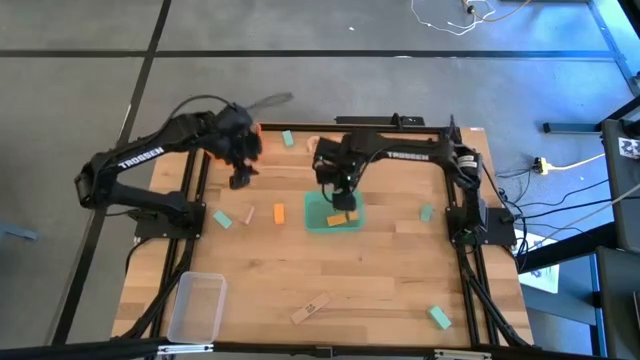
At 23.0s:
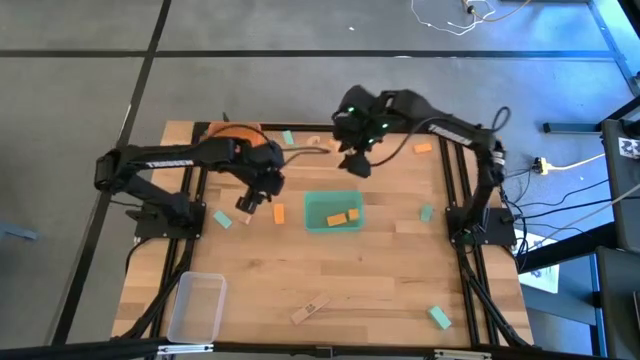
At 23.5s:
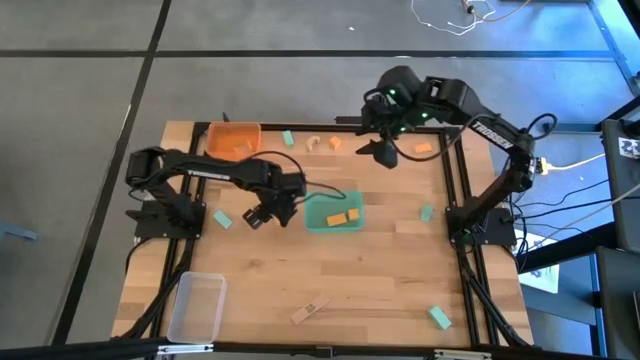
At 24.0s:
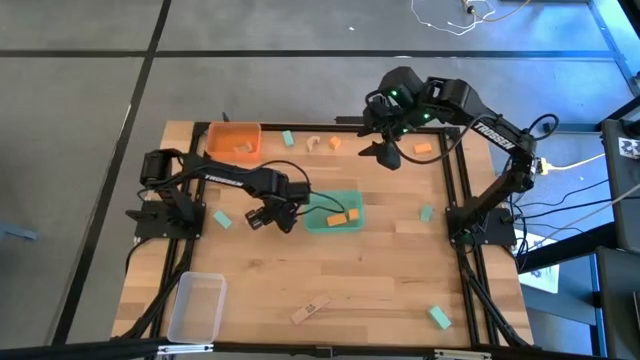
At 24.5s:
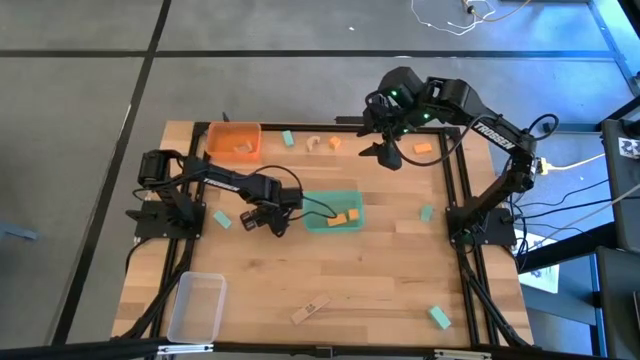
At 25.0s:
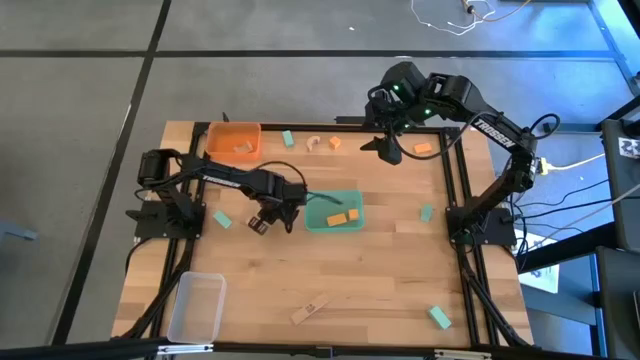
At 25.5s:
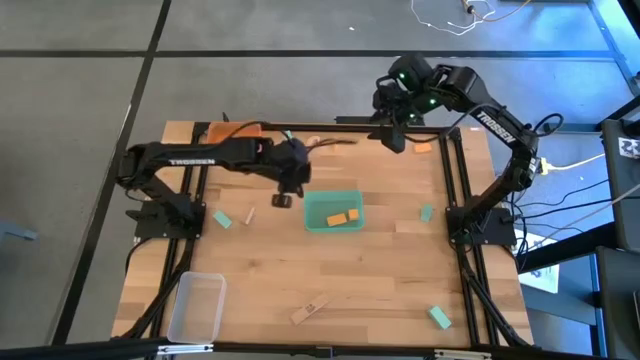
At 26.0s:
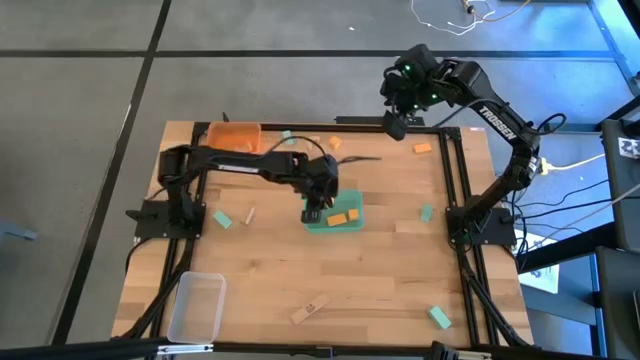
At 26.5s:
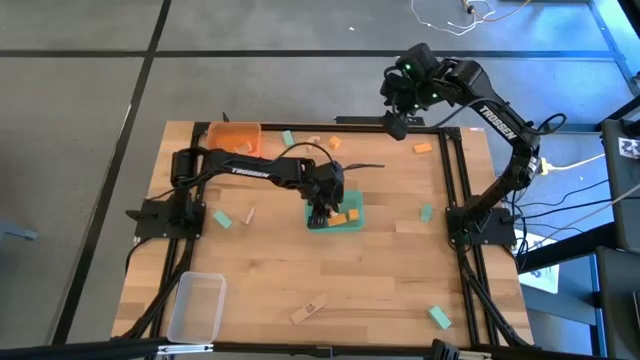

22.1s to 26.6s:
Task: Sort & place blocks by color
Put the orange block into the light blue bin

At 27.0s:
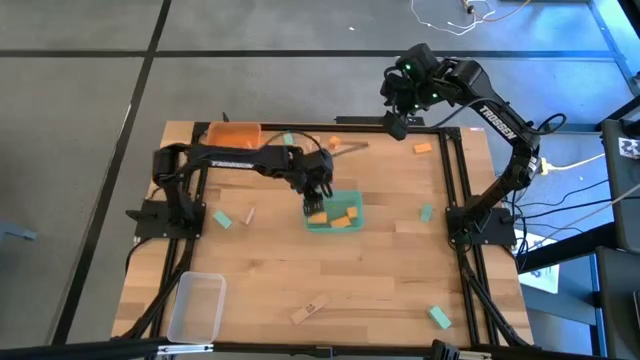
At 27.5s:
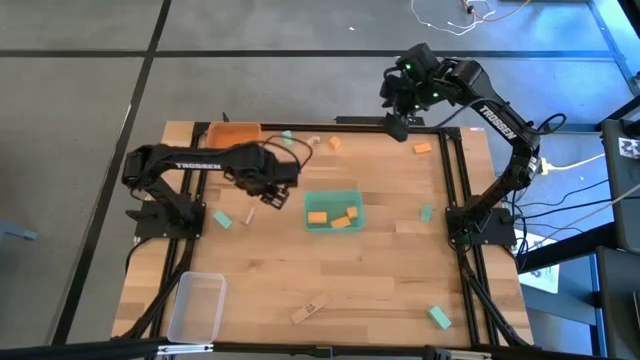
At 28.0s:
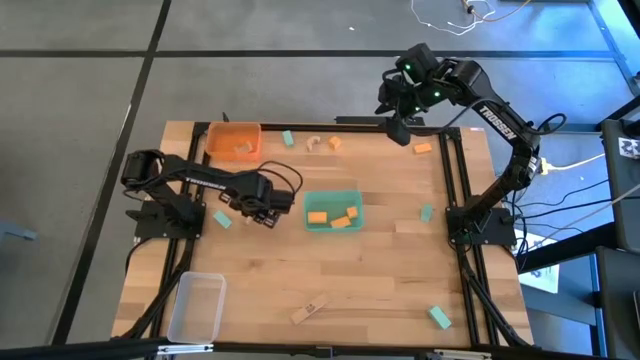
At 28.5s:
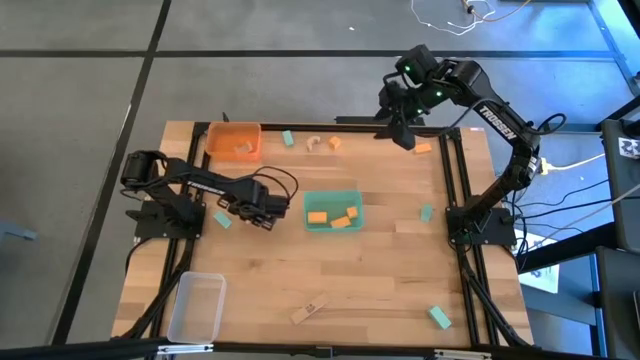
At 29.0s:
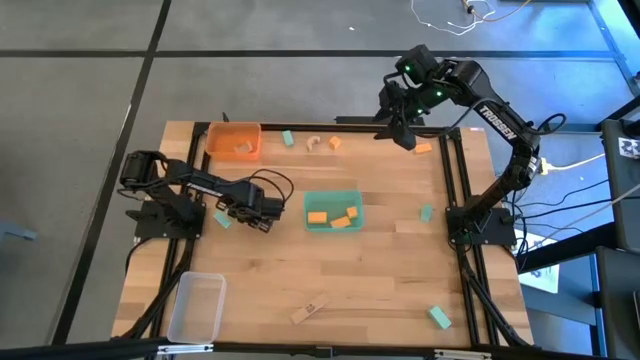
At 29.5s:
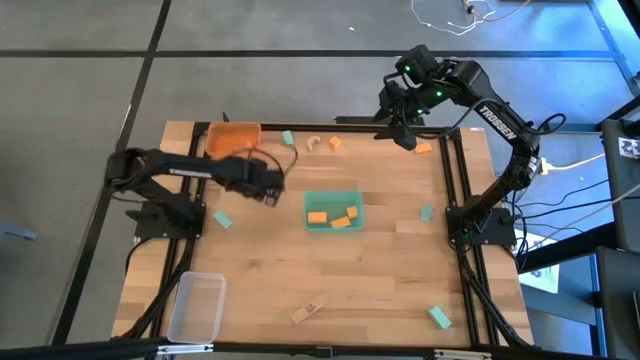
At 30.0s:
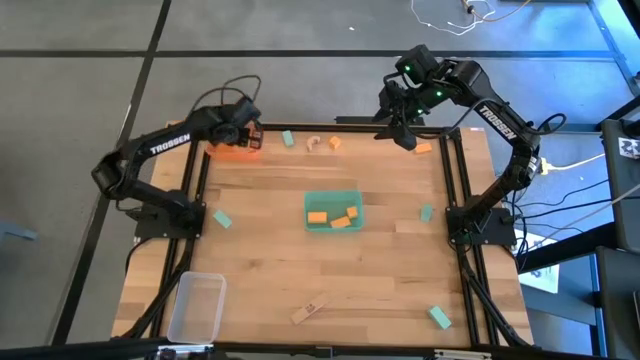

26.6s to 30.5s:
Put the brown block into the light orange bin

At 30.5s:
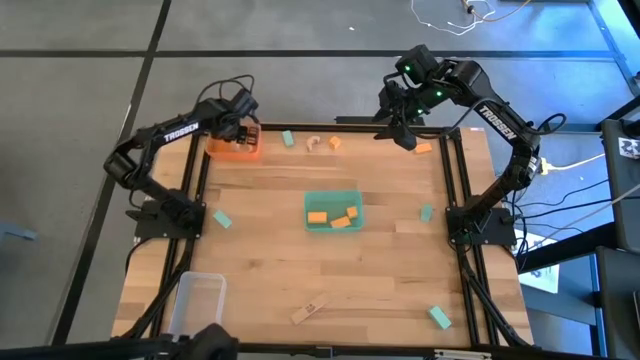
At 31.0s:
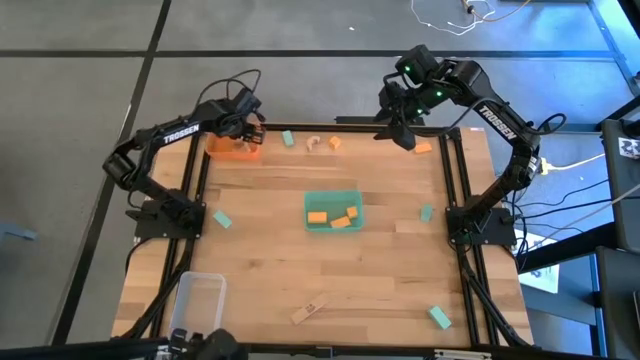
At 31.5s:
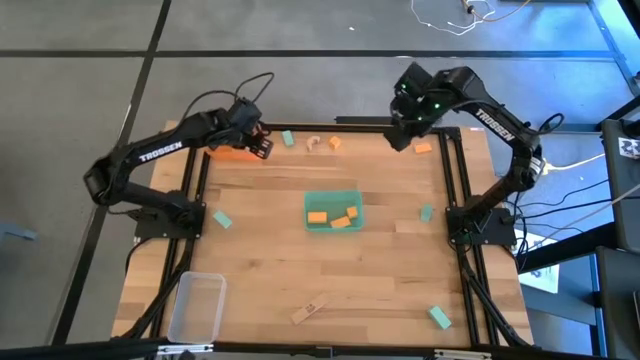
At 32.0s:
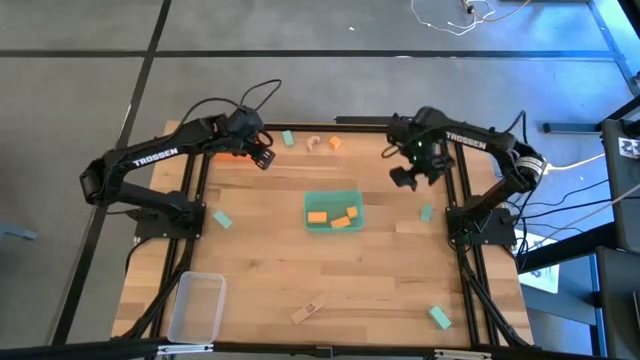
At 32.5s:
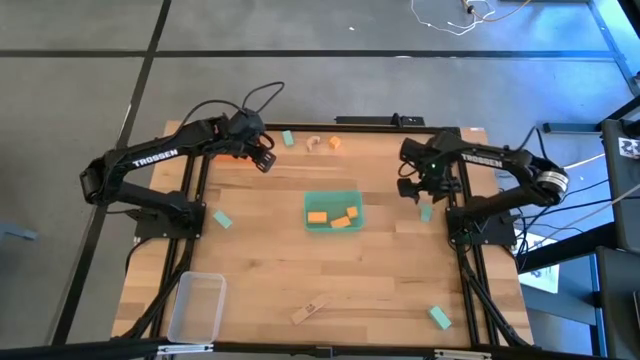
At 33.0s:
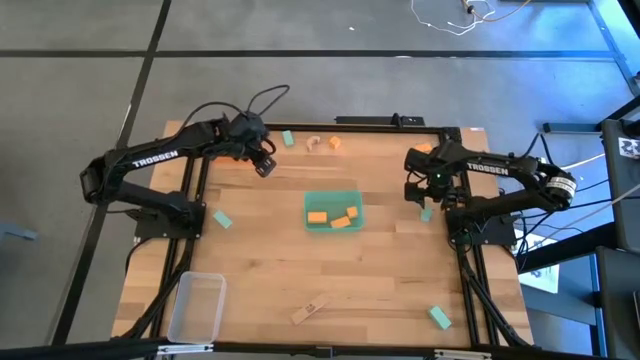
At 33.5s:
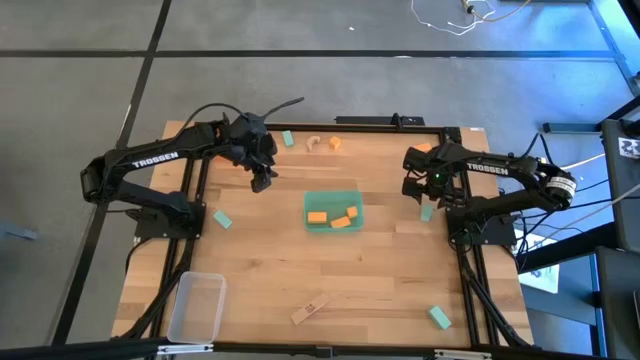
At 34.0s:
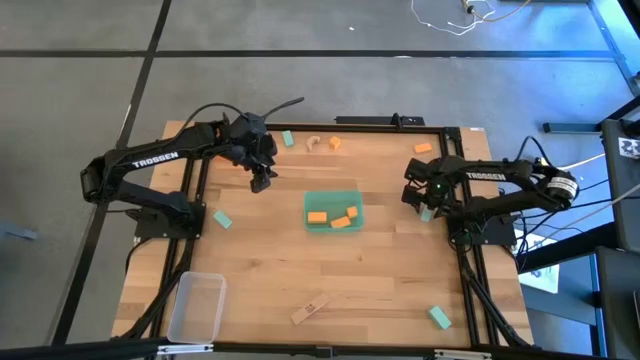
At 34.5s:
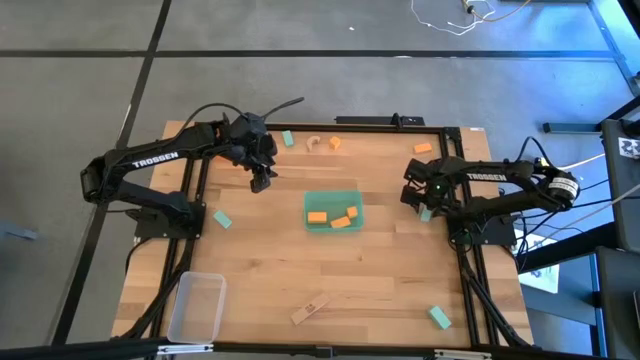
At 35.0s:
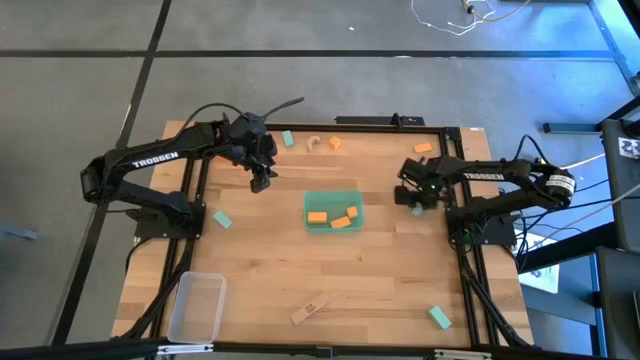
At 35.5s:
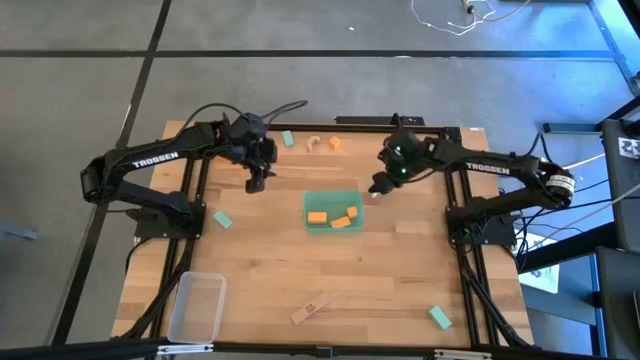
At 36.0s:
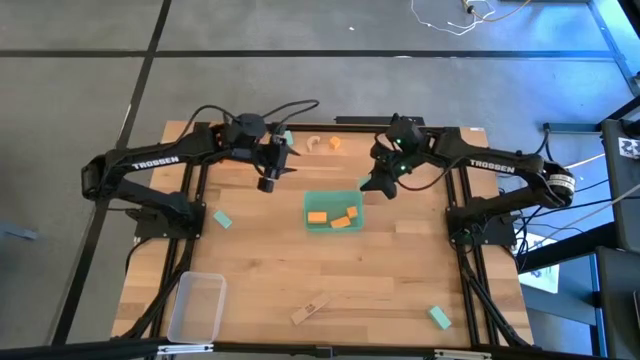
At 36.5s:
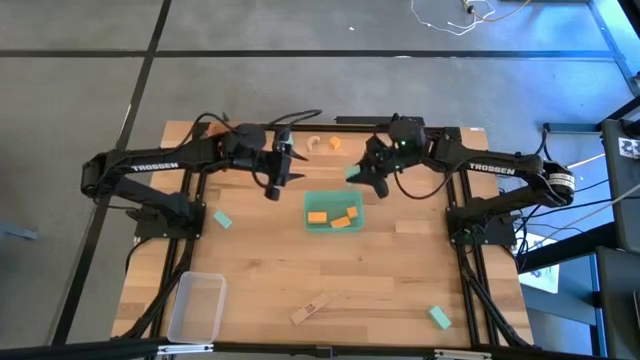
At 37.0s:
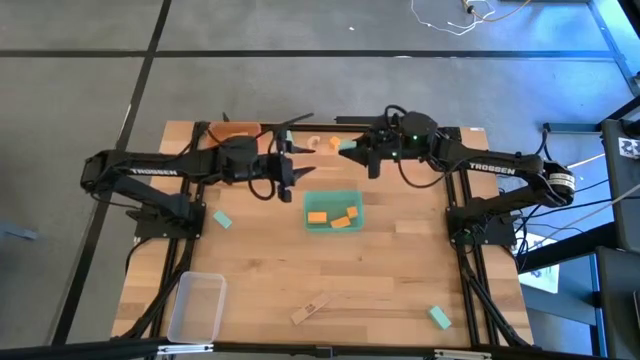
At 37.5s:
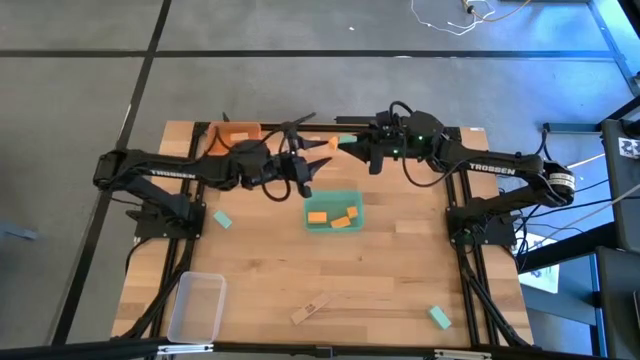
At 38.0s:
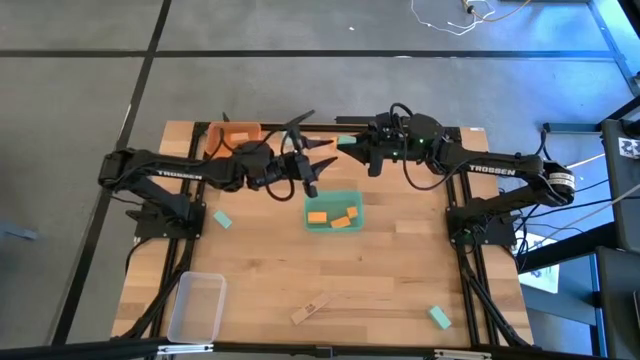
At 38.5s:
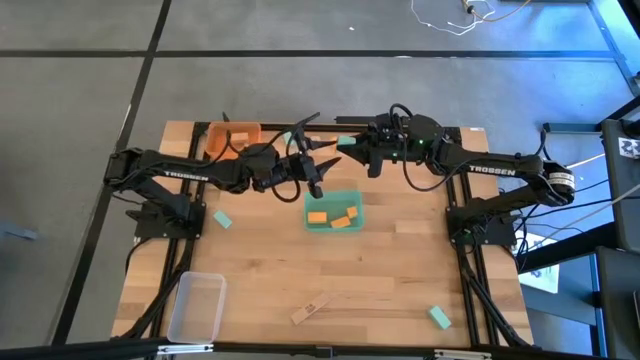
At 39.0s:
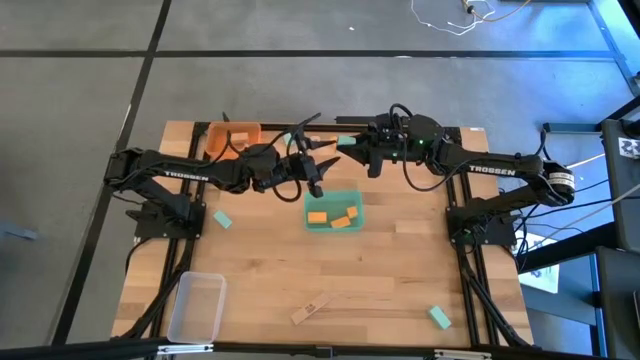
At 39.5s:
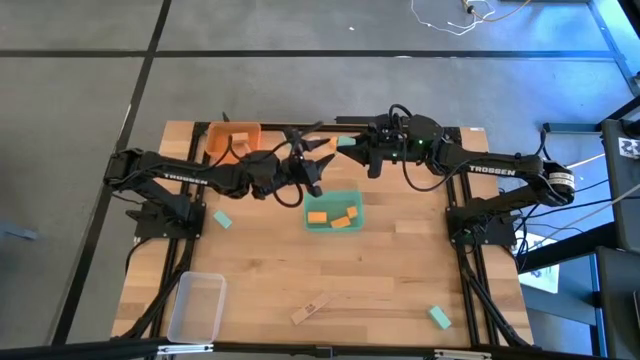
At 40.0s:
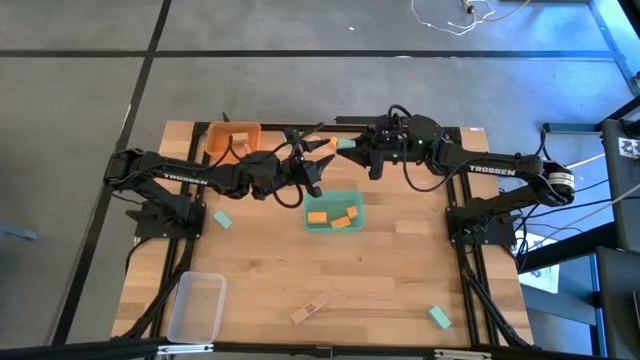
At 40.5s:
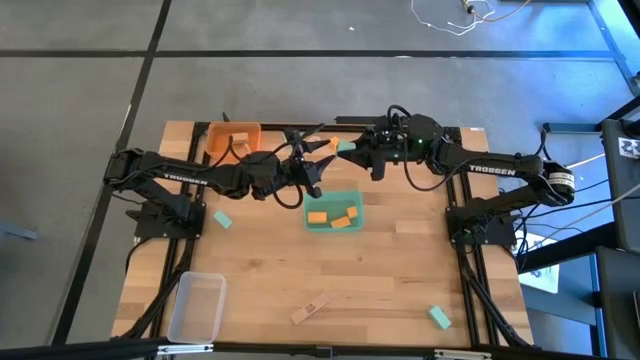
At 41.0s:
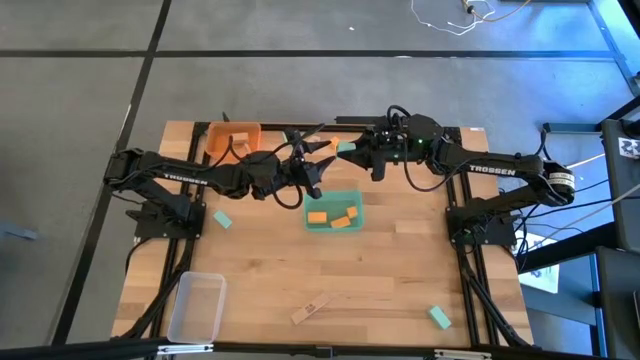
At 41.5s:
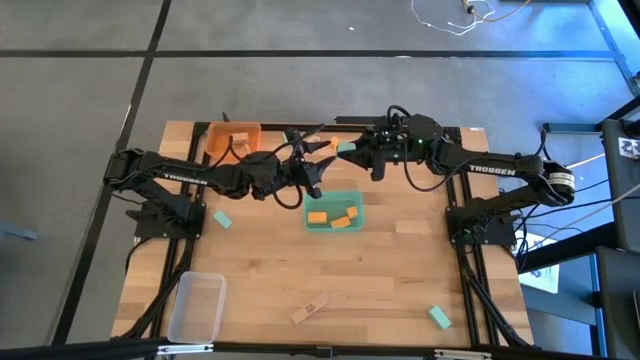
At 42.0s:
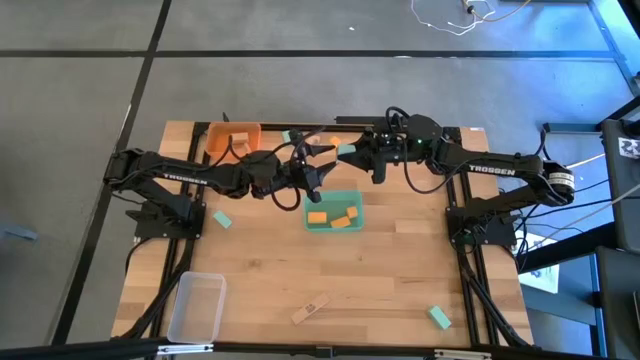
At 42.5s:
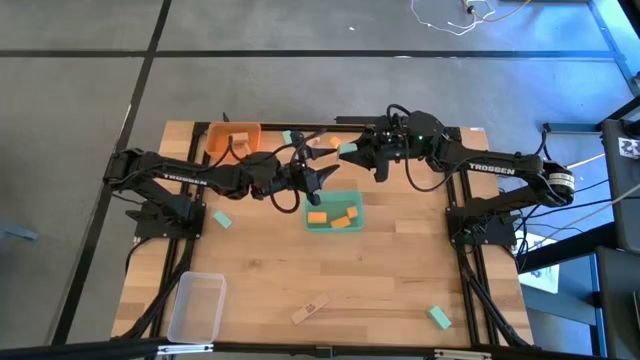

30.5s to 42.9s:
Put the blue block into the transparent bin

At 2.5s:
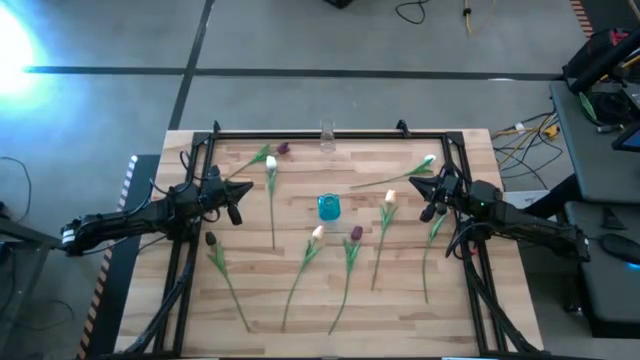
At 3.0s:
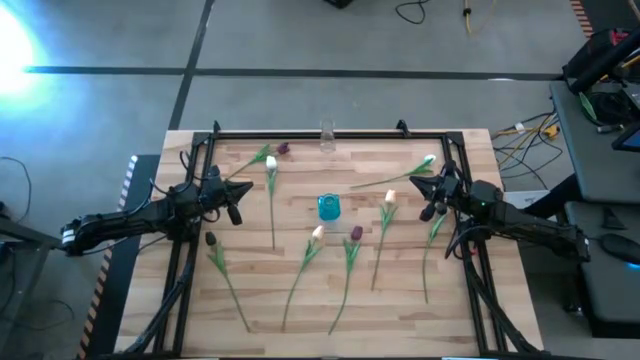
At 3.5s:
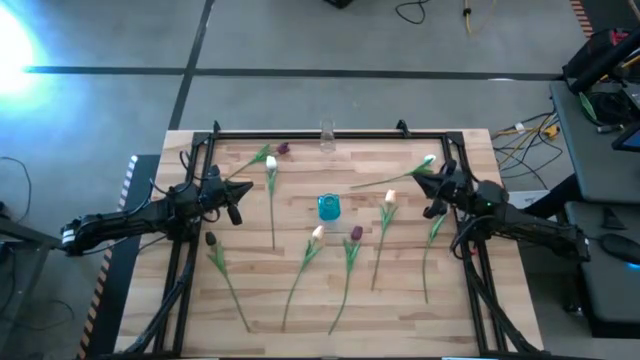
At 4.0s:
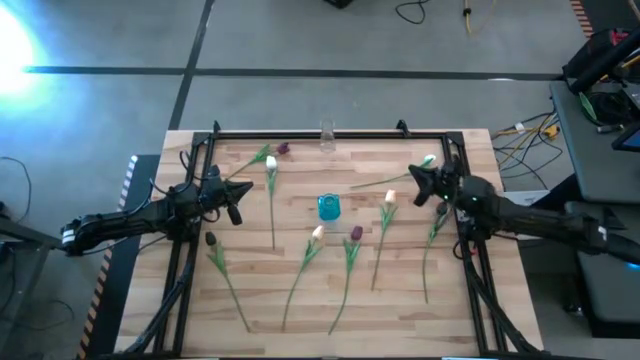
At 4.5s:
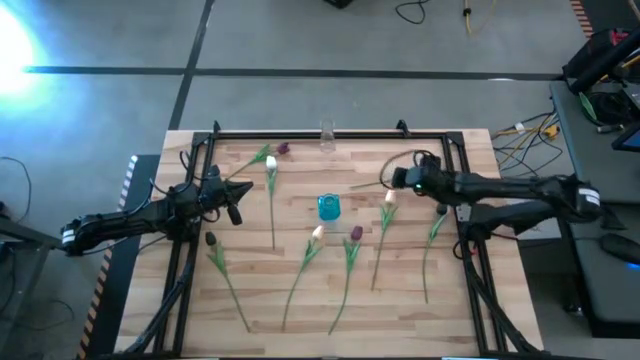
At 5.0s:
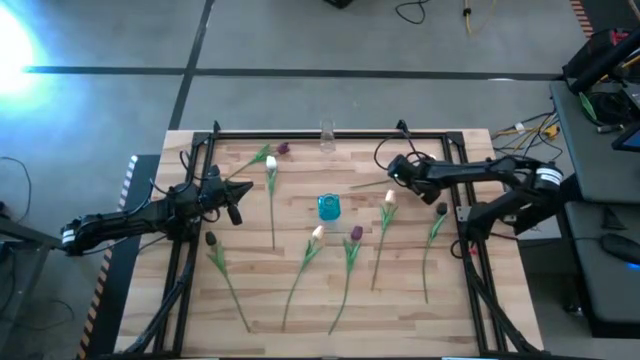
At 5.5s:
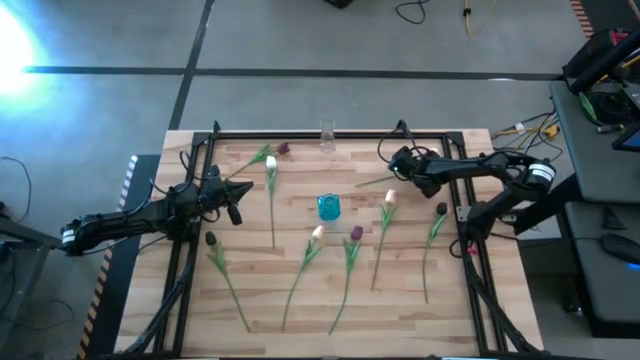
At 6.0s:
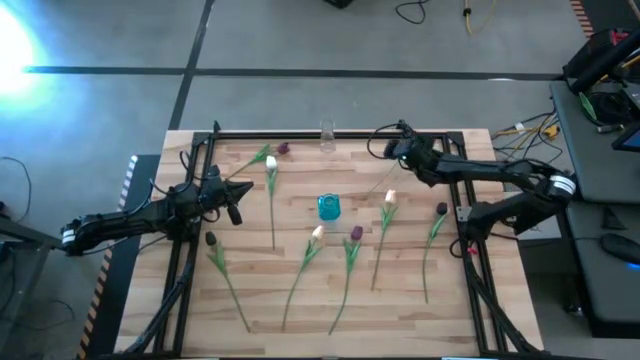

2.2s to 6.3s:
Task: Sort flowers into vase by color
Put the blue tulip into the blue vase
